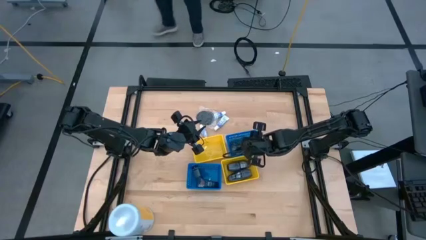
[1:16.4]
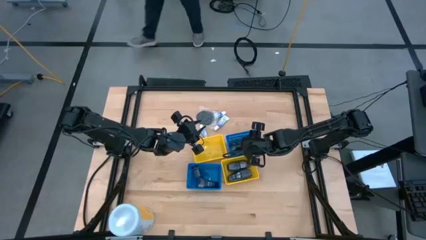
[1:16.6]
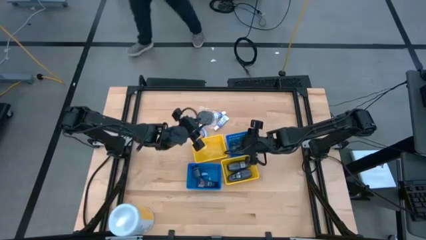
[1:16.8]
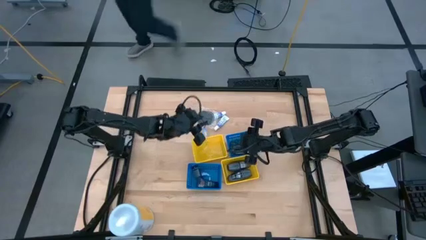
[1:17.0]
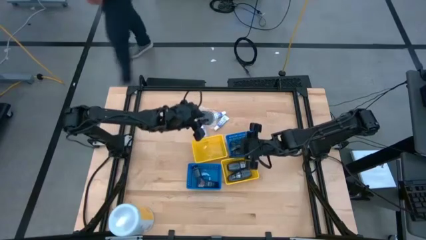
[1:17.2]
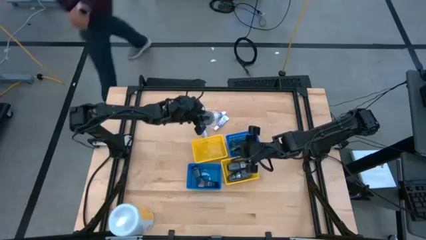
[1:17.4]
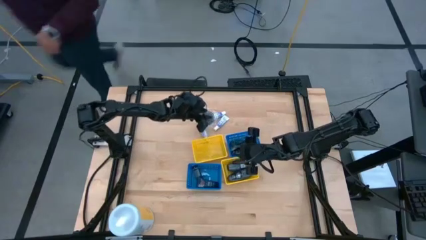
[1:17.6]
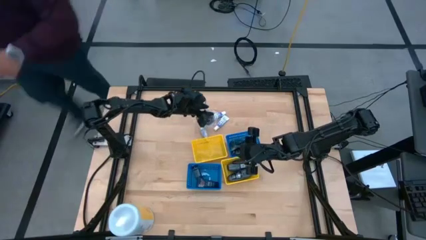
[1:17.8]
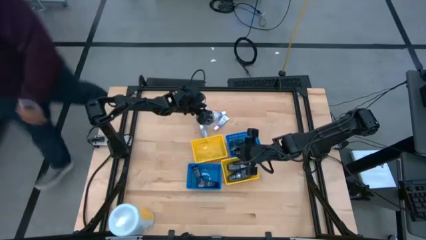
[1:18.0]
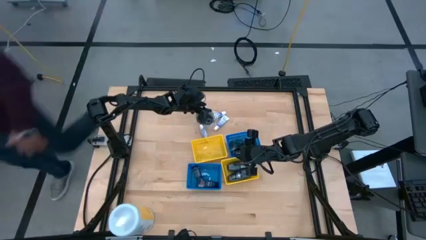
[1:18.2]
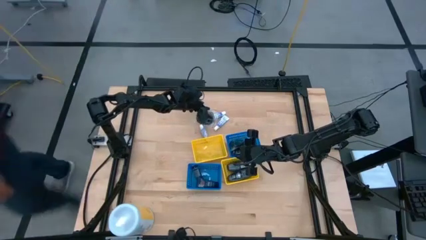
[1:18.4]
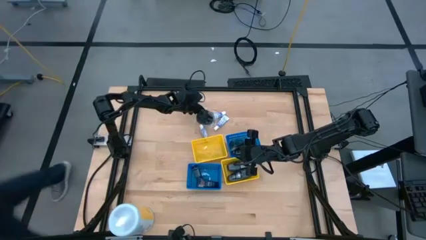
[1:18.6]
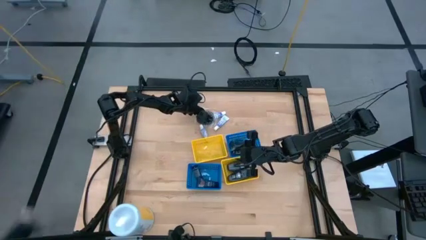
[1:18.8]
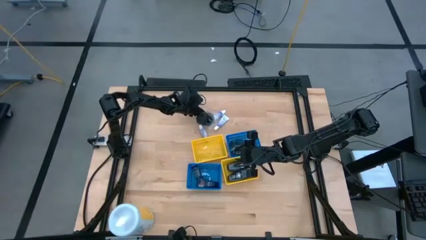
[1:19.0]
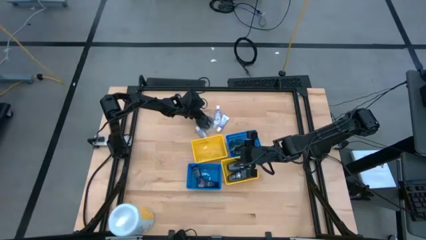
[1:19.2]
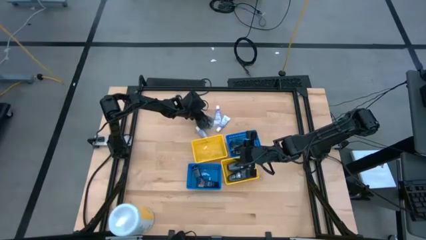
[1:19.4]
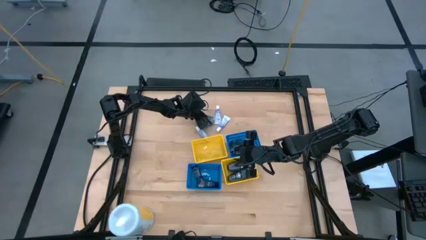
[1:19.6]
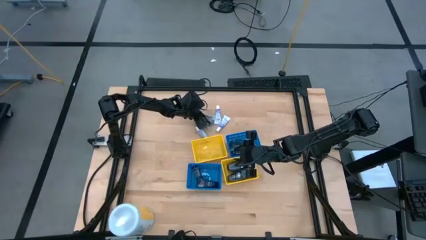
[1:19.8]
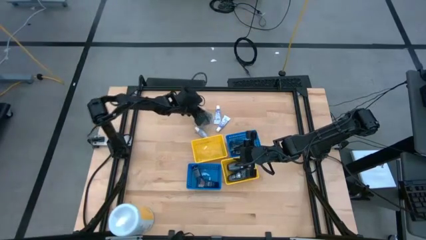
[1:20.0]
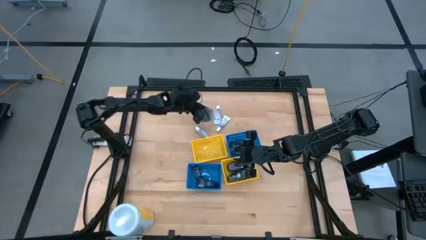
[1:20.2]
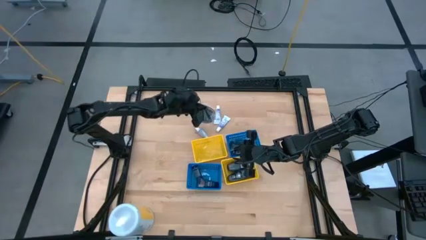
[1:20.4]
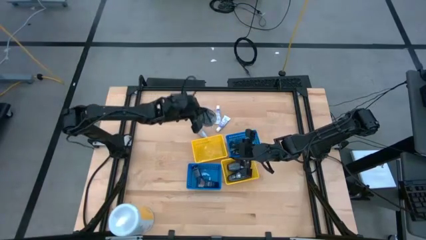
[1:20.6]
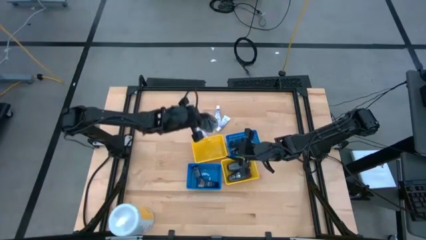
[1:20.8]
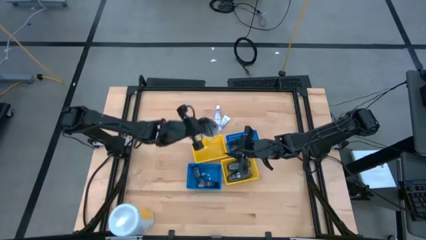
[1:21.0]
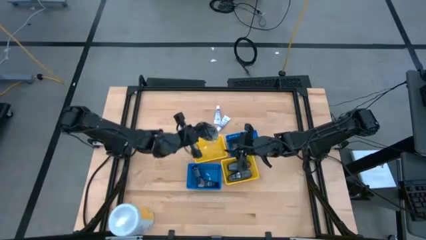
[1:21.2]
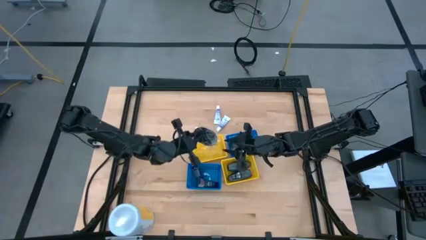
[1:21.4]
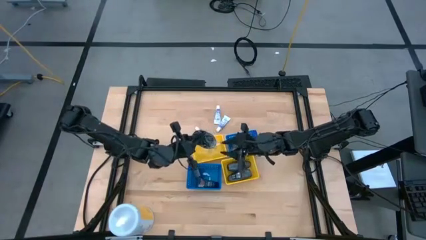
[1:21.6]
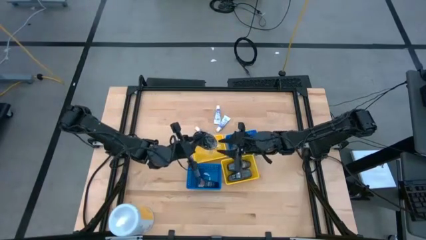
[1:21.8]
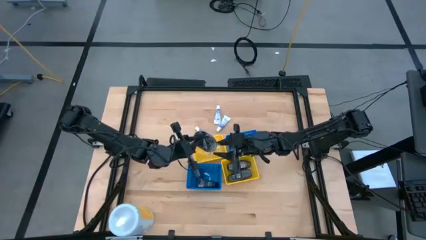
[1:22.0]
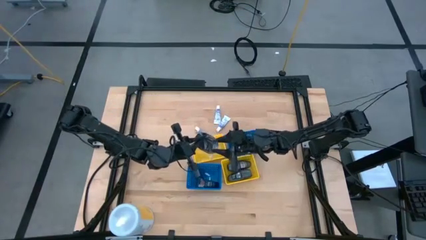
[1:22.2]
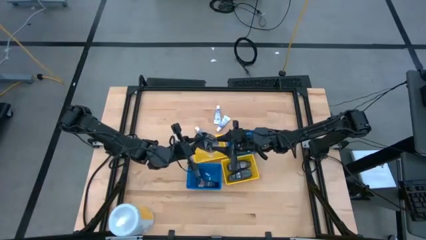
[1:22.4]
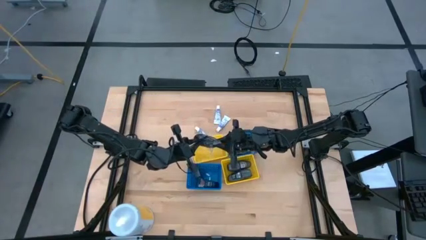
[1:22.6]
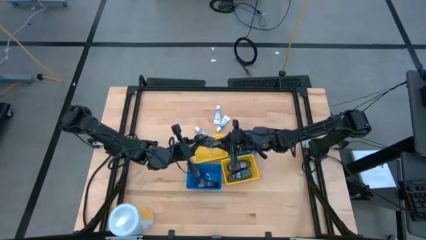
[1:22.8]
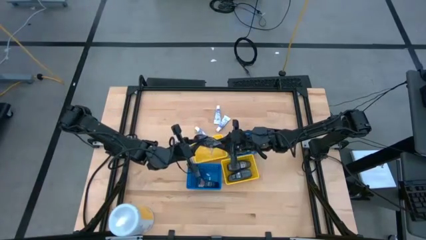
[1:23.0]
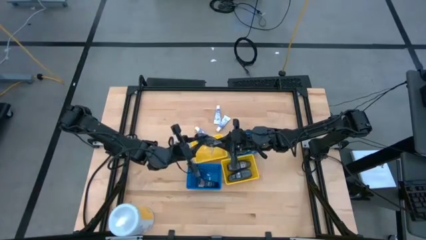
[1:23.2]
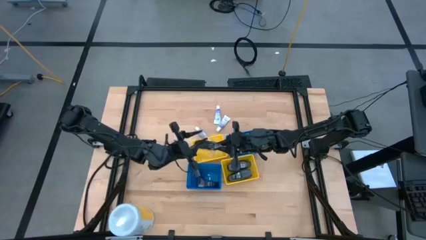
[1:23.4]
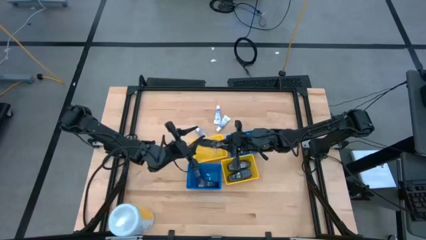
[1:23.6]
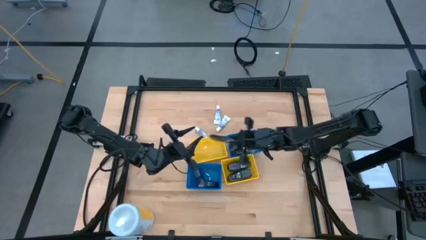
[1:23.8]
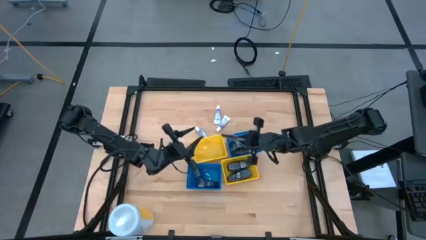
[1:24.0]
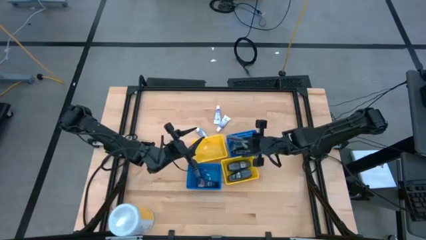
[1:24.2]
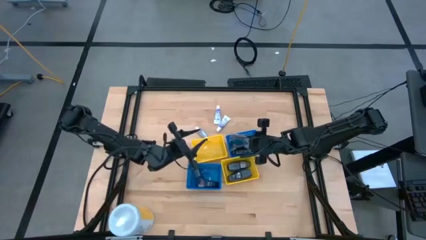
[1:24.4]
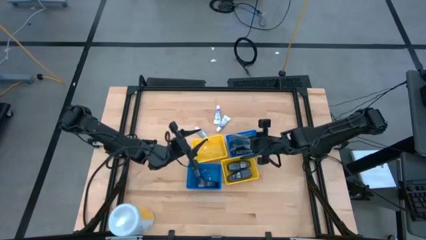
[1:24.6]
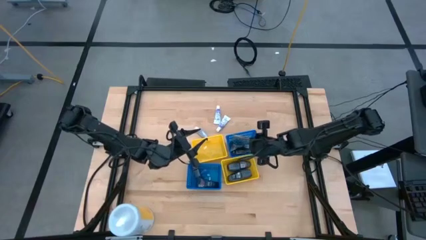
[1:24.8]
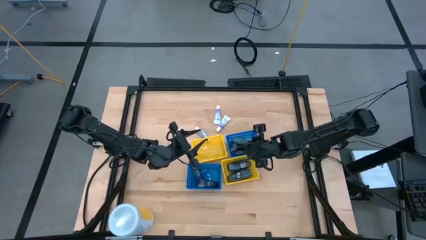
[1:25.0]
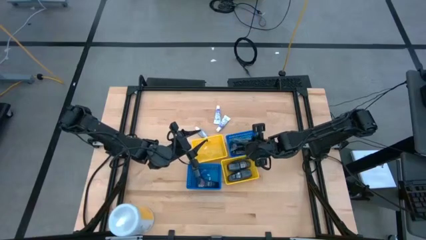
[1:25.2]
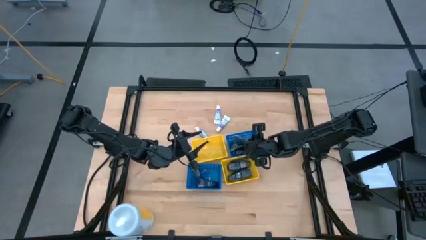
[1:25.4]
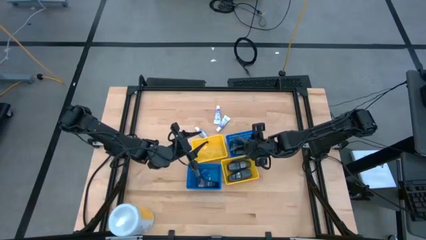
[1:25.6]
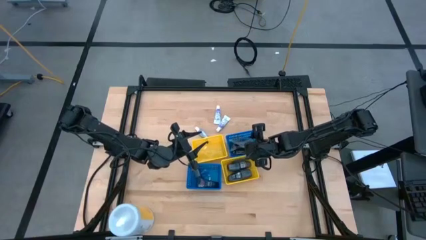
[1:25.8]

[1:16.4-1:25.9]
Task: Pick & Place Travel size toiletries
Put the hairbrush in the top blue bin

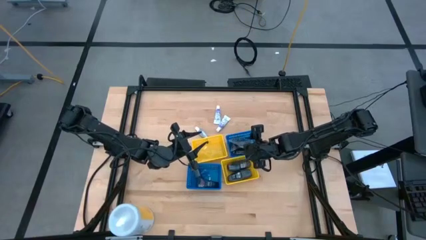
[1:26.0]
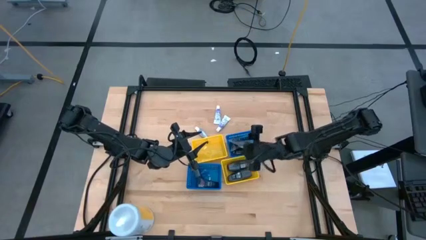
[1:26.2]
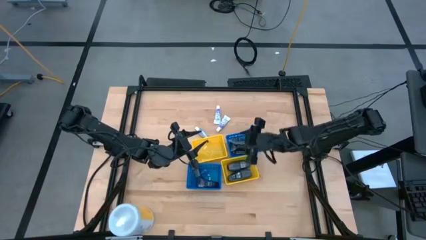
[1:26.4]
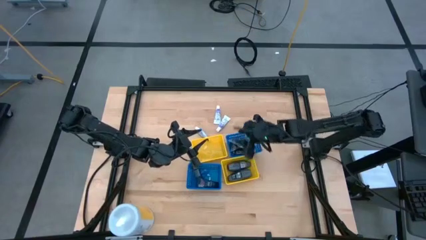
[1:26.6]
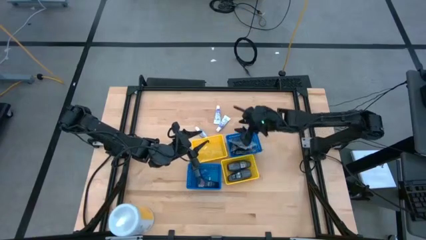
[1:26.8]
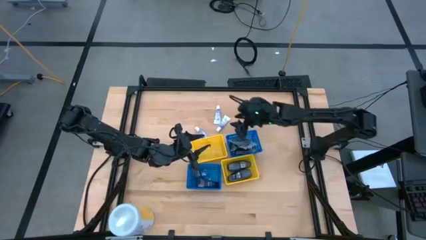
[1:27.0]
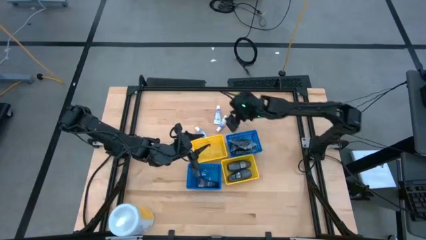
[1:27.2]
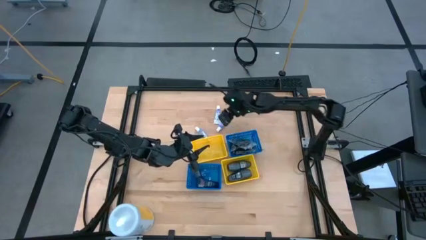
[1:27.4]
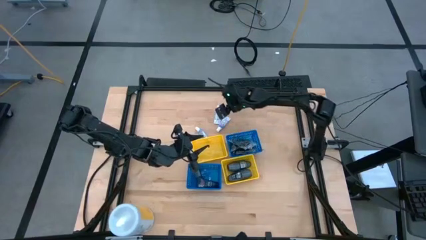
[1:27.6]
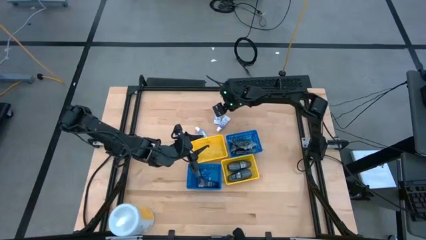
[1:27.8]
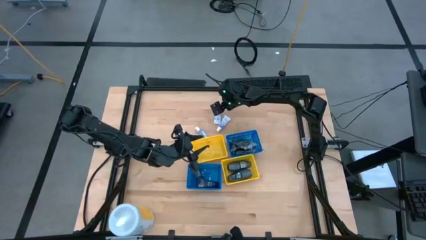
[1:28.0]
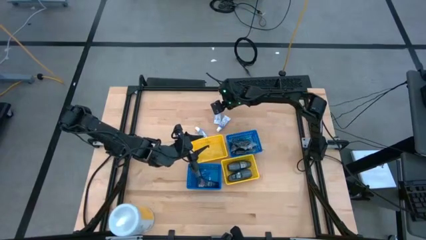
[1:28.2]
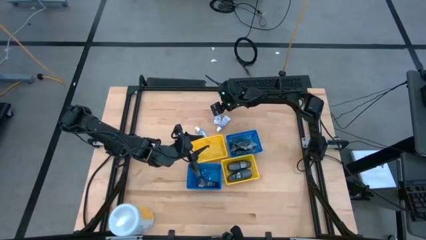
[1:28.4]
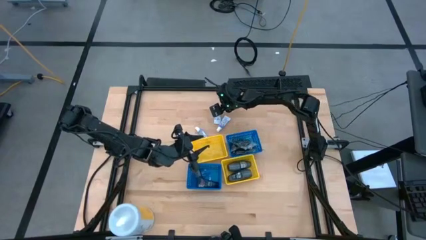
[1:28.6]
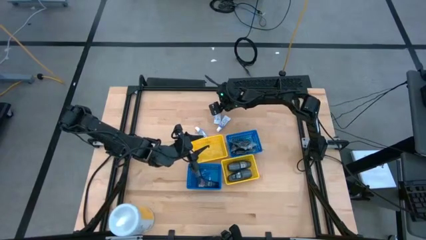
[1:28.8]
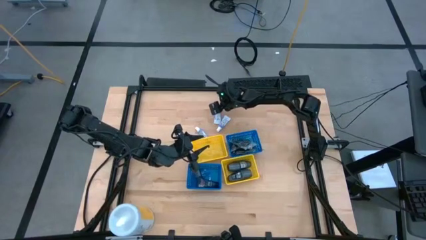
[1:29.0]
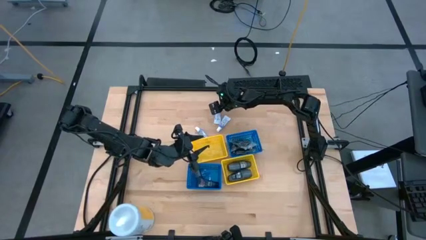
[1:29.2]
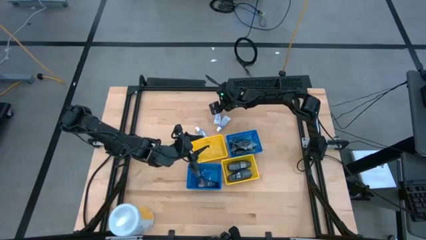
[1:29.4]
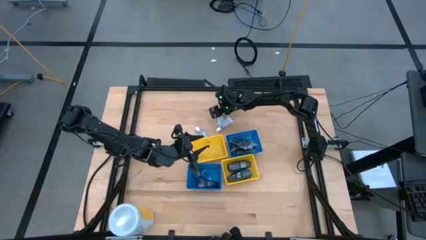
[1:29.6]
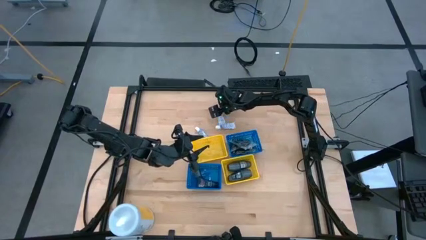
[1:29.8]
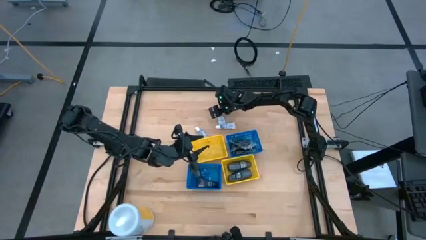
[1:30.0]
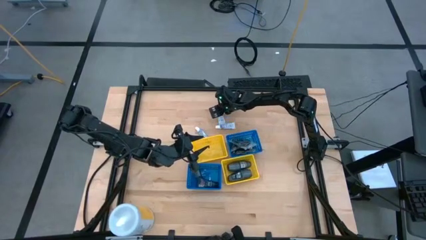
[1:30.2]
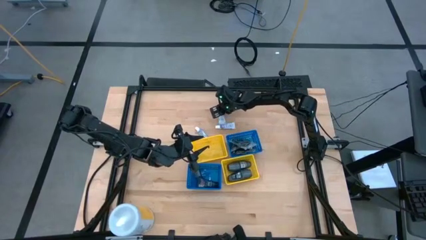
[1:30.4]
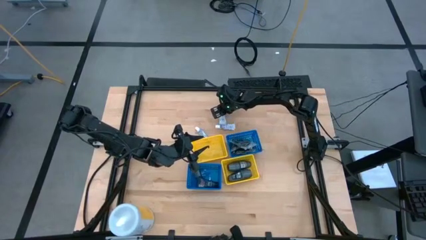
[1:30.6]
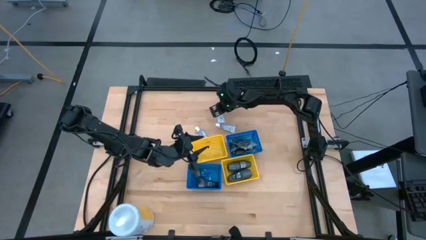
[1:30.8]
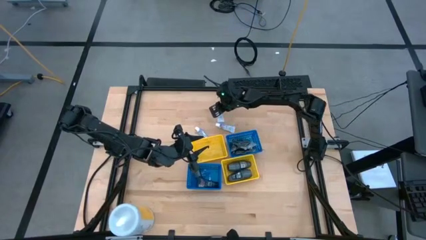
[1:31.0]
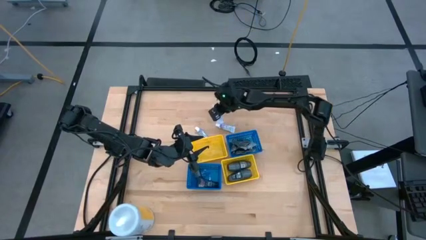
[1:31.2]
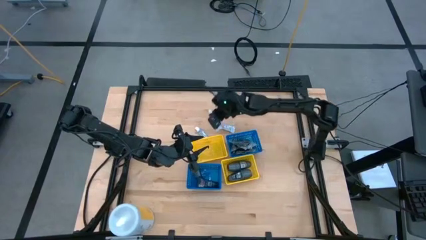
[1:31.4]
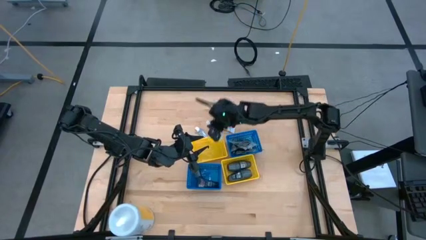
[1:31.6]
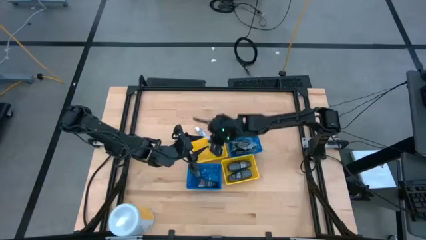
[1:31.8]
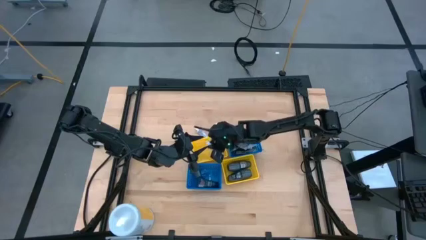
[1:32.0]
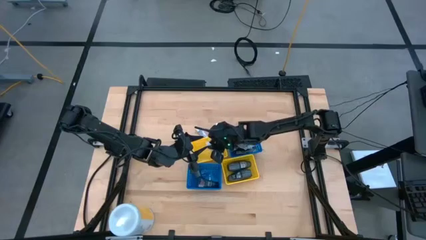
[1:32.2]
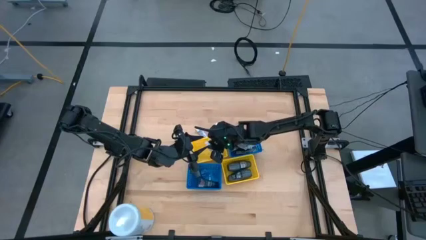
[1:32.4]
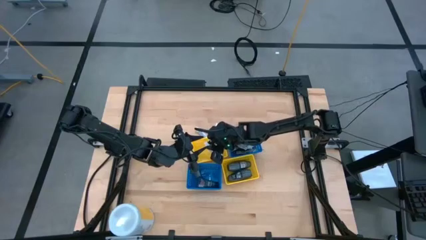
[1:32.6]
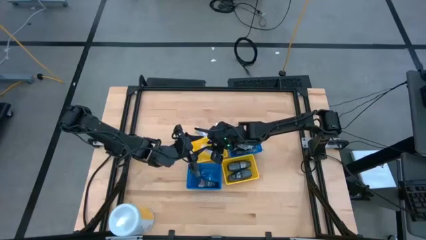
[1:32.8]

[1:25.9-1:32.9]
Put the middle toothpaste in the top yellow bin

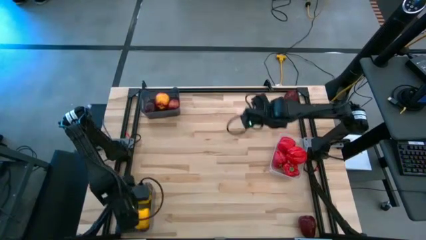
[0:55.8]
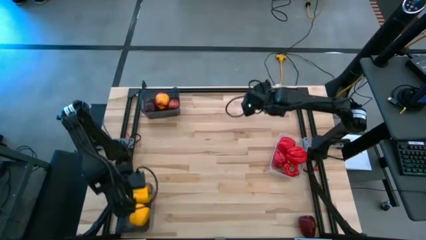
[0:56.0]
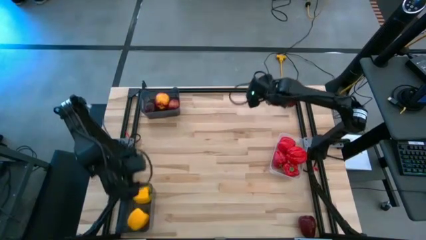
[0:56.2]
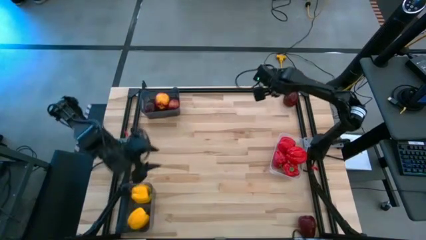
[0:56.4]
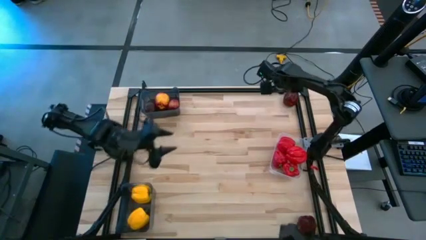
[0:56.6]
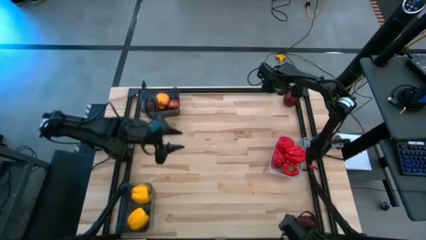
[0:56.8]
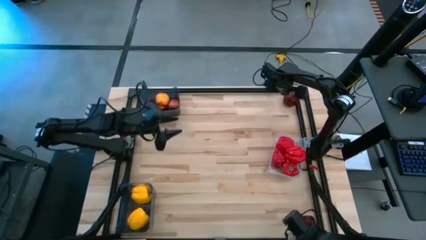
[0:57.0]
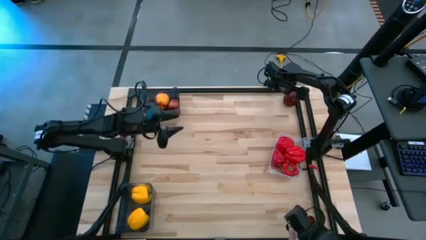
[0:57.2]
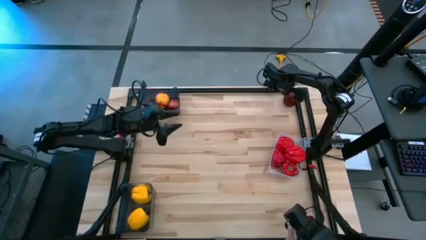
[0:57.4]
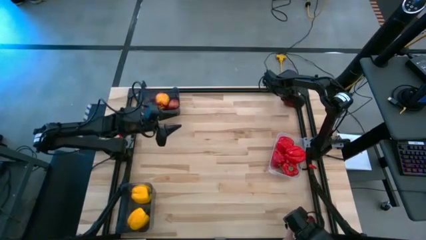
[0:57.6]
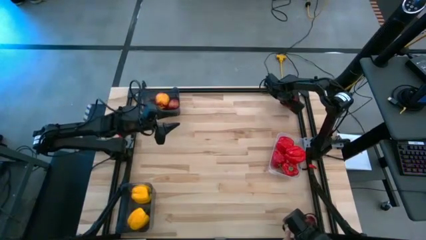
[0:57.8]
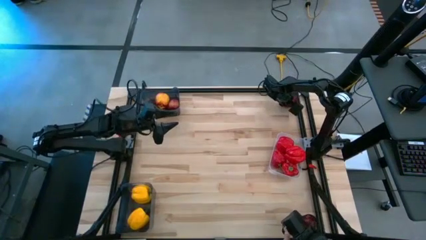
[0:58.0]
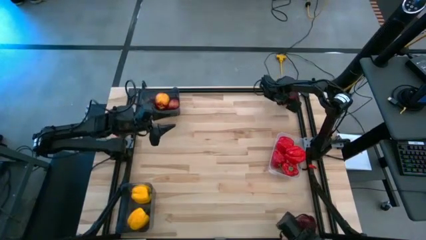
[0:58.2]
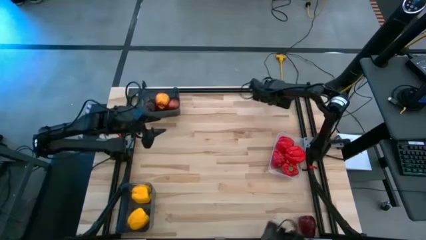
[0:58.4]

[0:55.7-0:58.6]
Task: Sort produce into baskets
Put the apple into the top black bin
